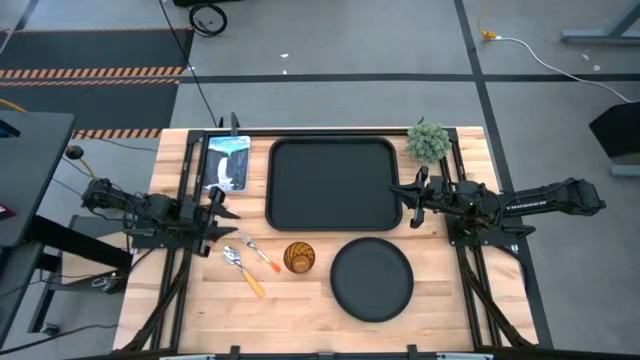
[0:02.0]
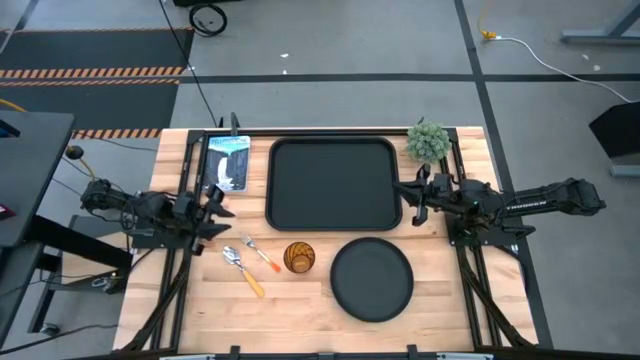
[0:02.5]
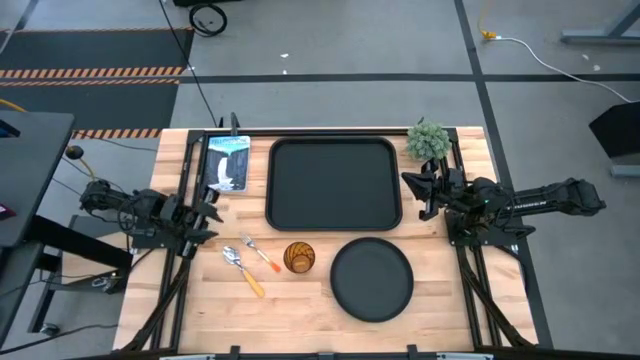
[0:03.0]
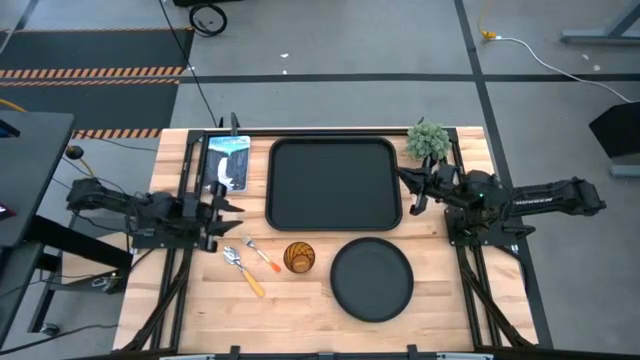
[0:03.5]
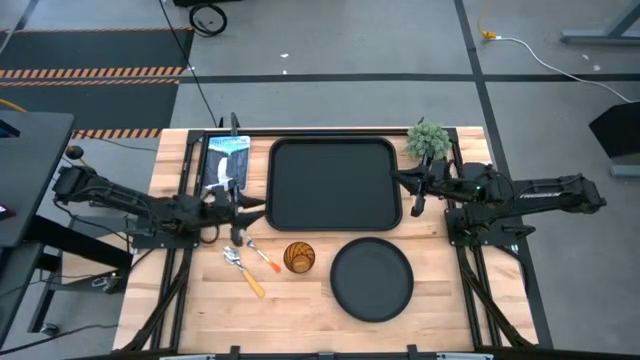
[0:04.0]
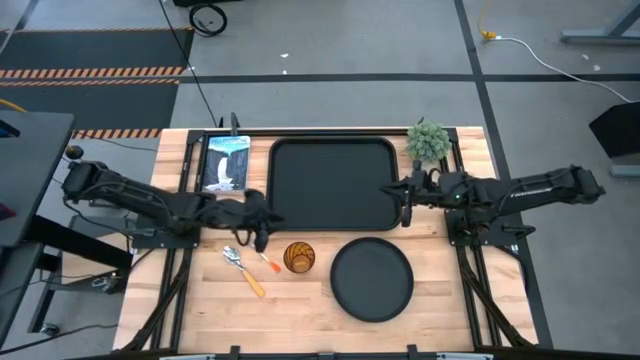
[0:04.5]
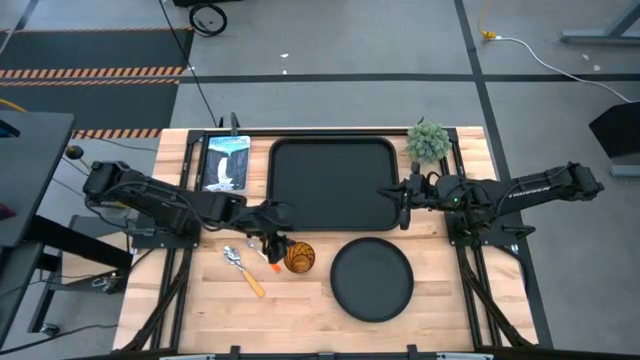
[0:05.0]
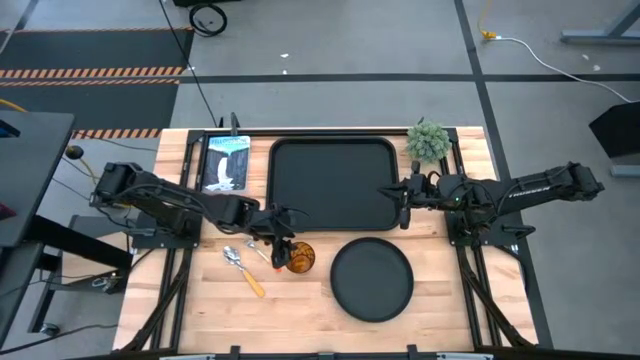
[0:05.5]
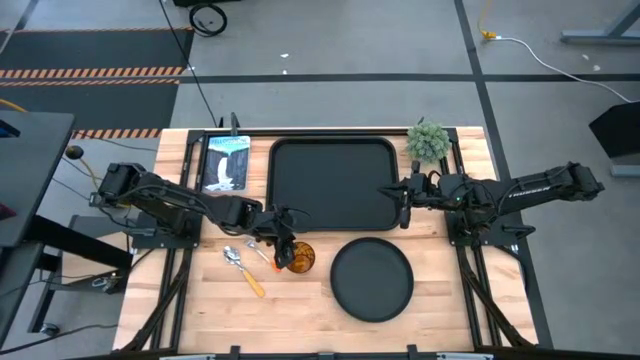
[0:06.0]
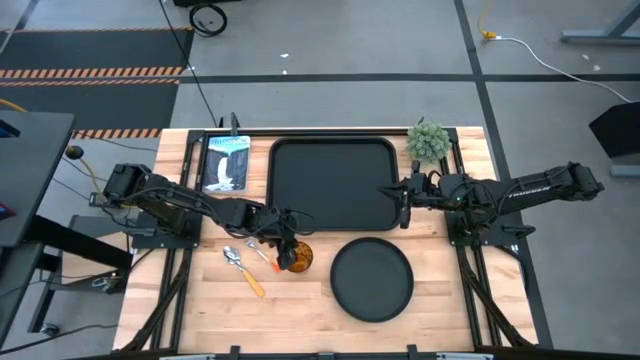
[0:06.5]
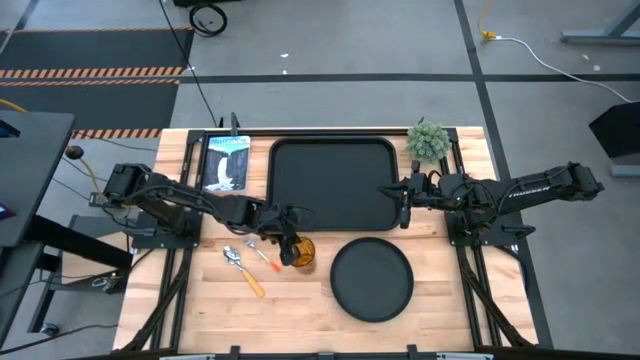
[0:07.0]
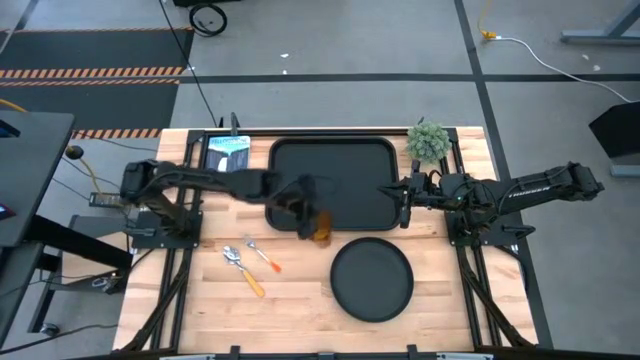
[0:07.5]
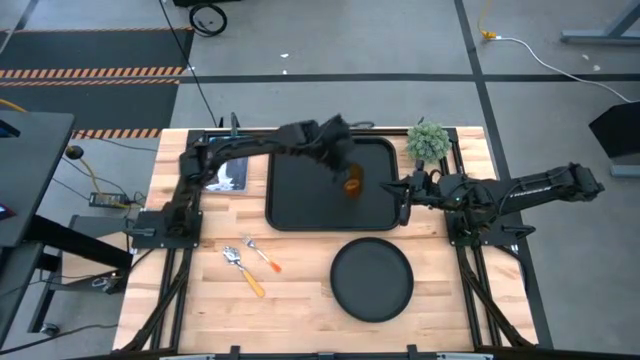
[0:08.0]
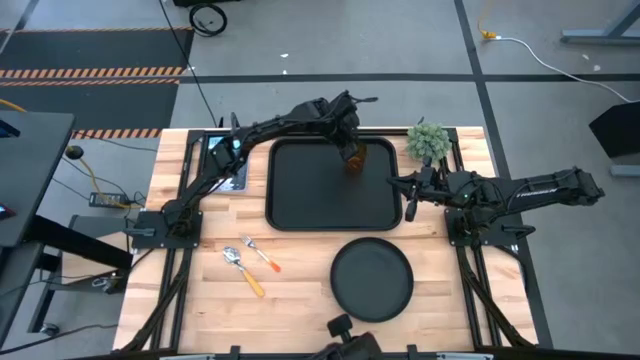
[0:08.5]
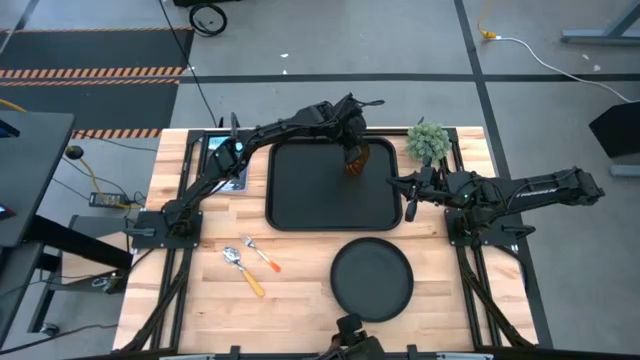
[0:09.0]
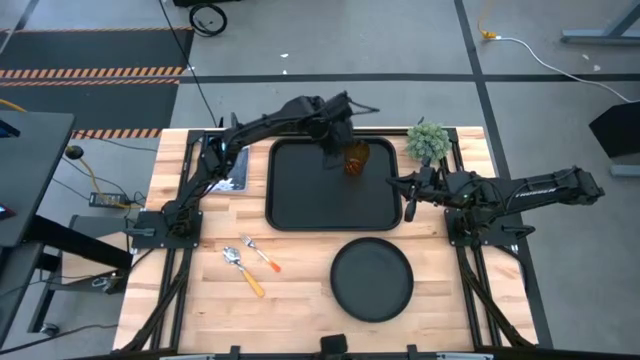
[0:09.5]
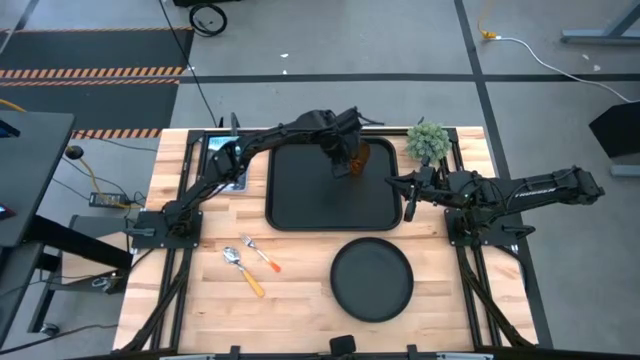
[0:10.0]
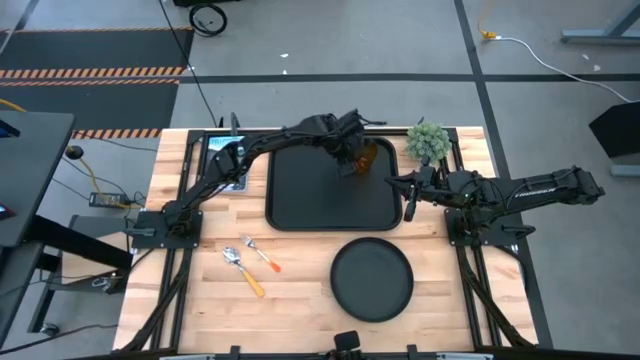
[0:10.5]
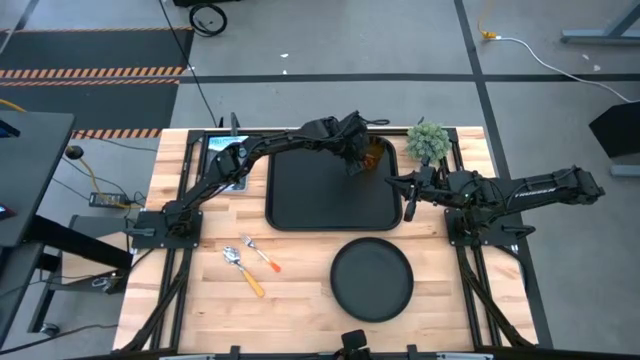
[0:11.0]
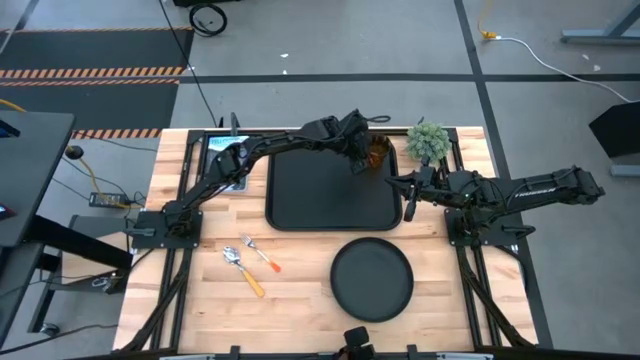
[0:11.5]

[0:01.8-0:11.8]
Task: Pick and place plate/cup/fork/spoon on tray
Put the brown cup on the black tray

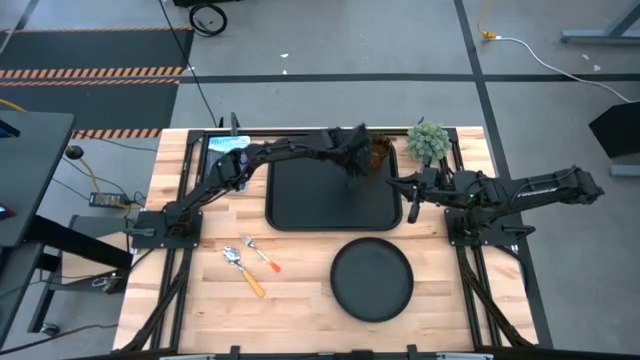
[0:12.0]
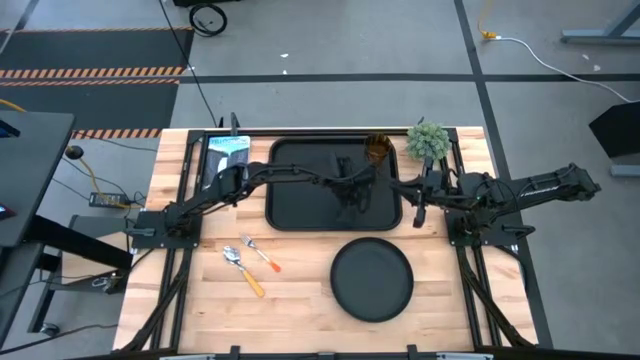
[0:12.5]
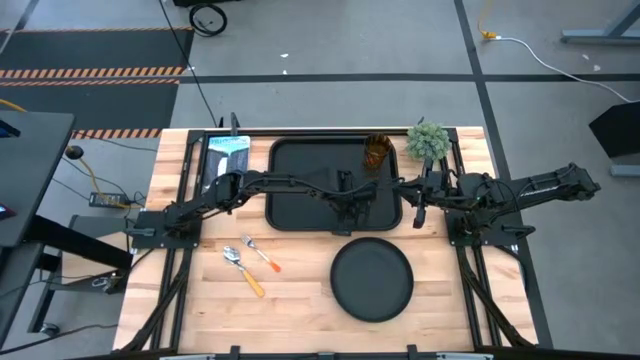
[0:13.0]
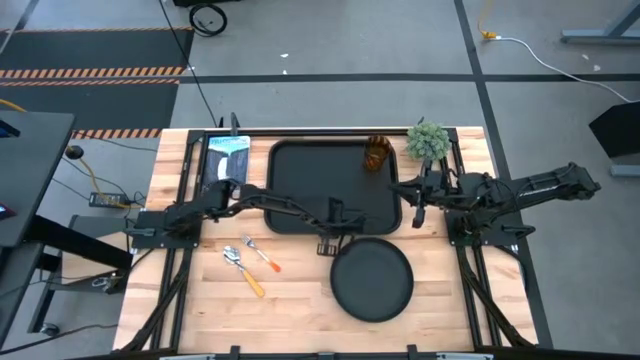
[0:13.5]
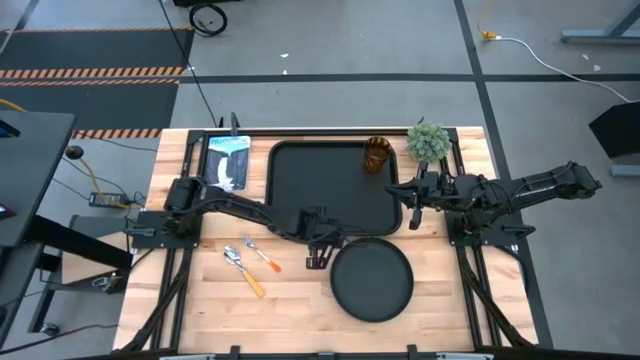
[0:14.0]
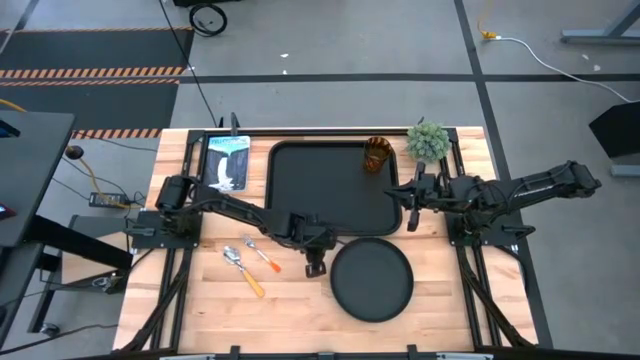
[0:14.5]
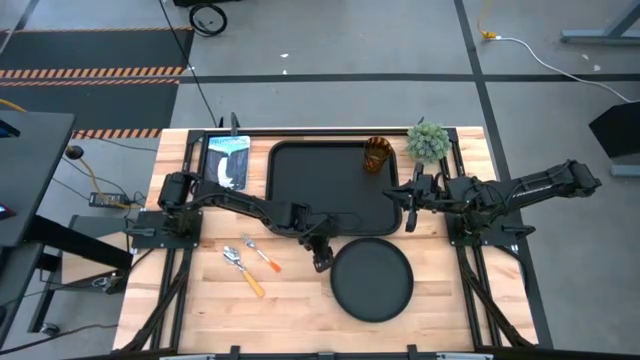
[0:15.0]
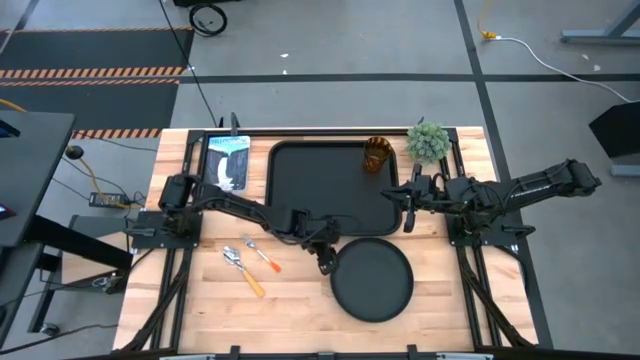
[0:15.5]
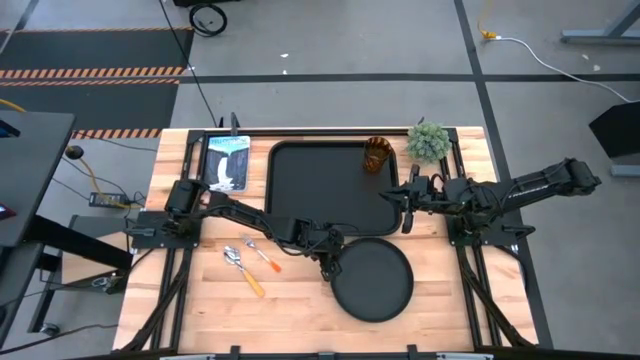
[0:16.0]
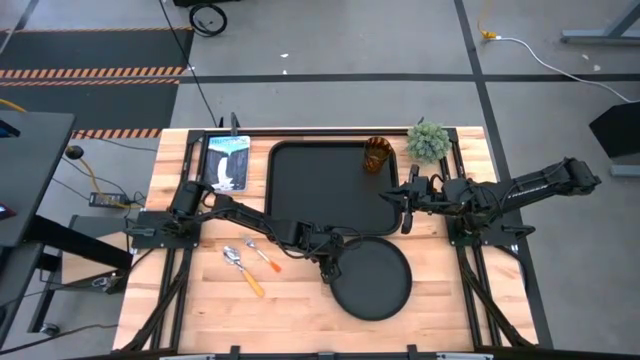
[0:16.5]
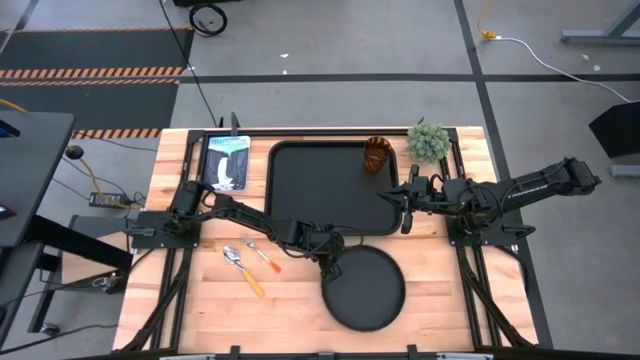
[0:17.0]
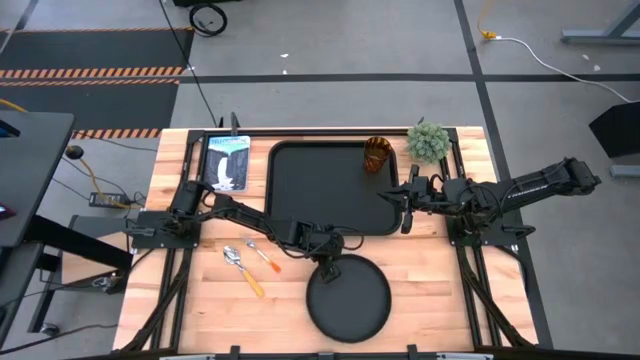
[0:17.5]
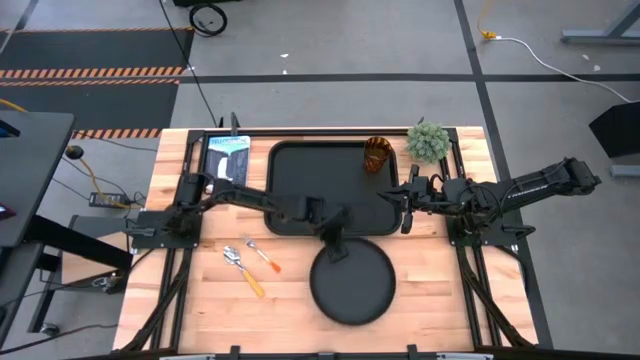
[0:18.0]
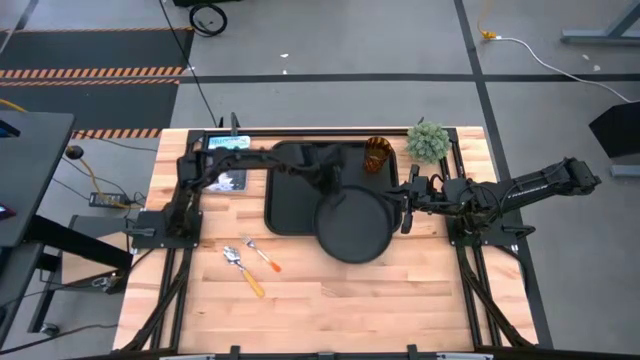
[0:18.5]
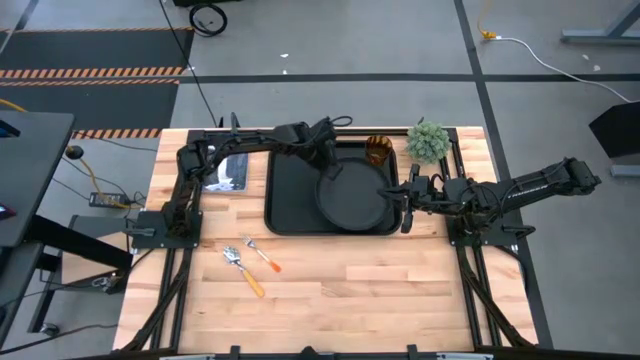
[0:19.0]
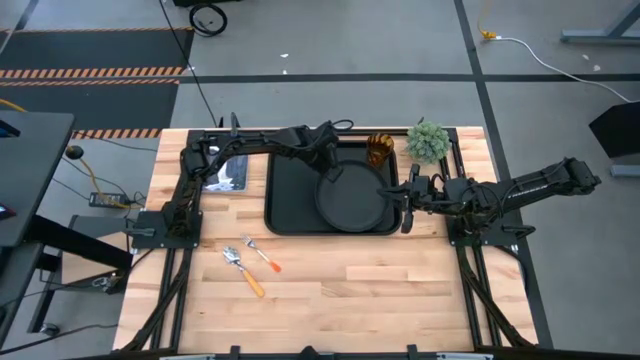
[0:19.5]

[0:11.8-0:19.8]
Put the black plate on the black tray to the bottom left of the brown cup

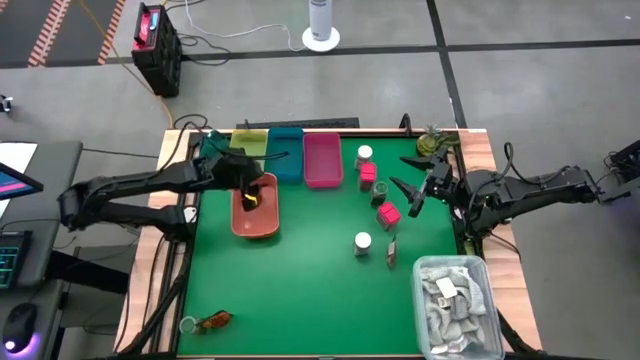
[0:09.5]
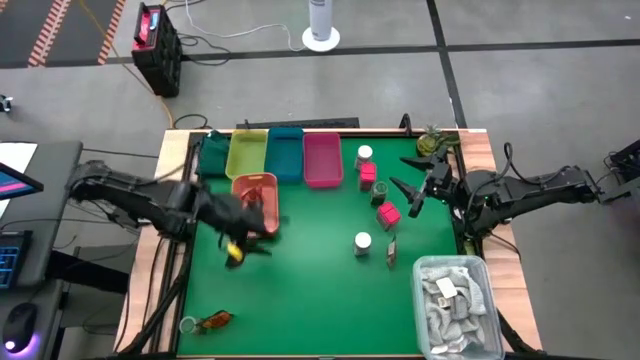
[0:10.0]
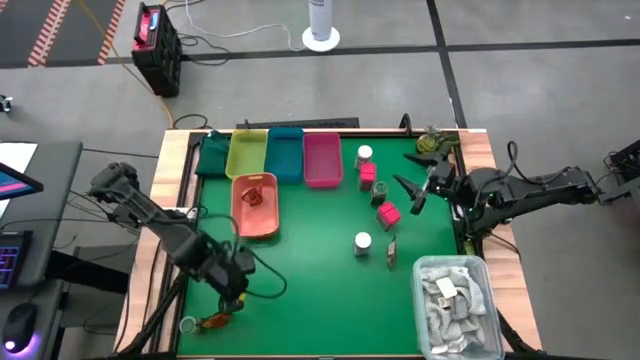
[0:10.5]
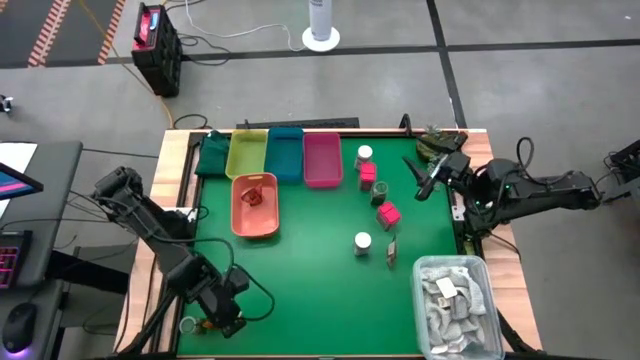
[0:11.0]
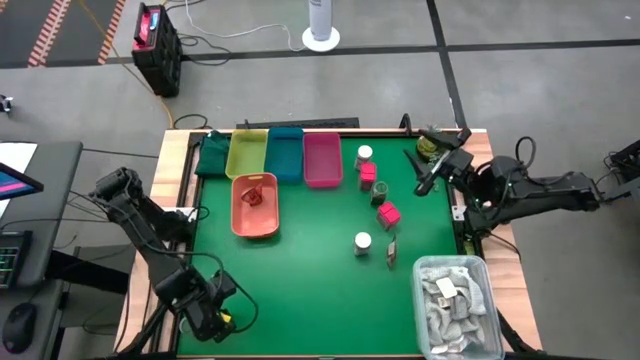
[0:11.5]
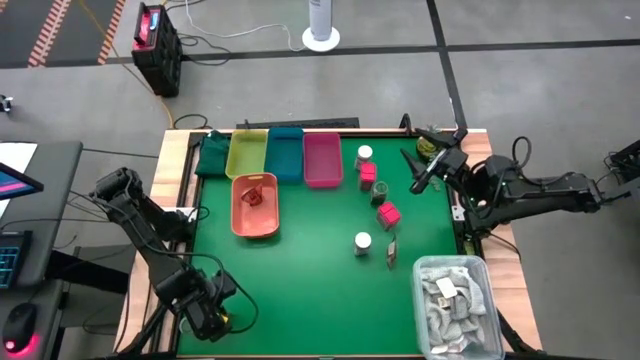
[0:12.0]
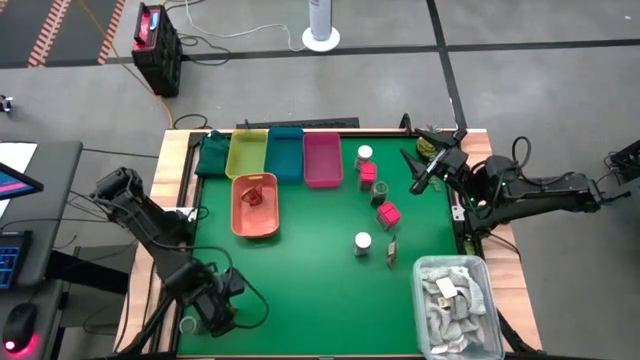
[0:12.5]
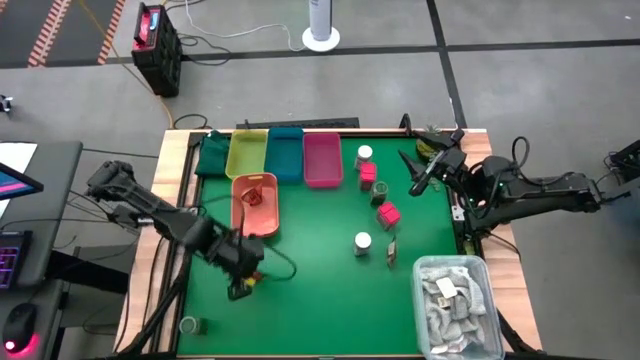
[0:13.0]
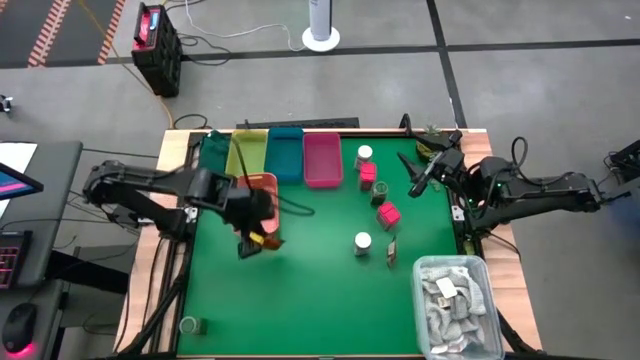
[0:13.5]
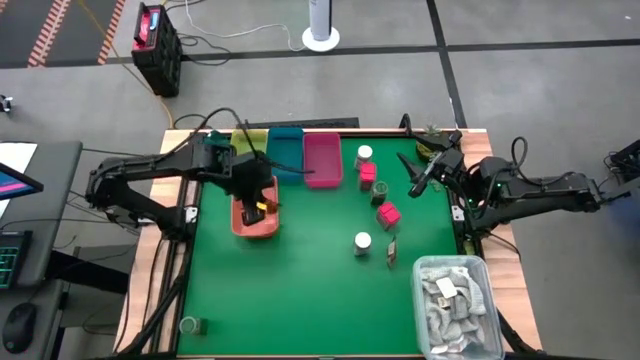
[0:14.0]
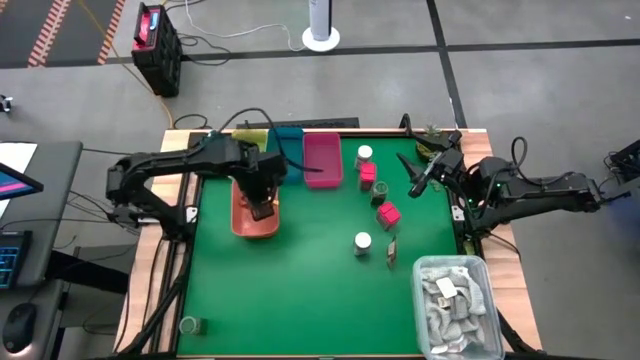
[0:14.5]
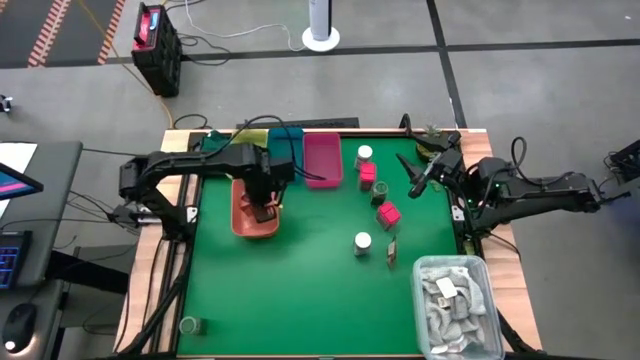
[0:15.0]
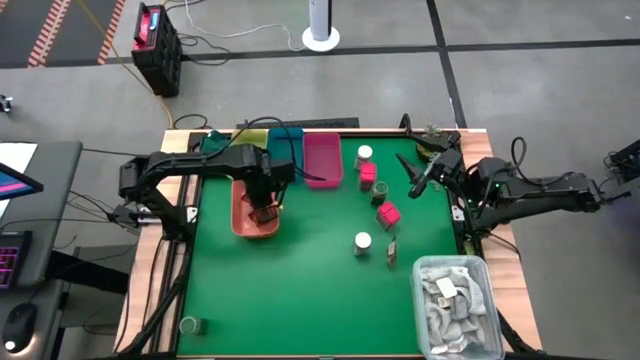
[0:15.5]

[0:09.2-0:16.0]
Task: Sort spices by type
Put the bottom orange seasoning pack into the orange bin
